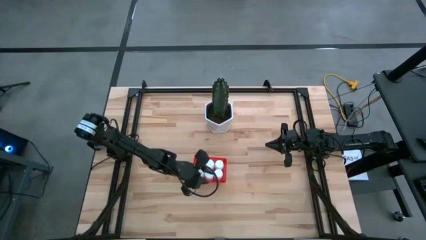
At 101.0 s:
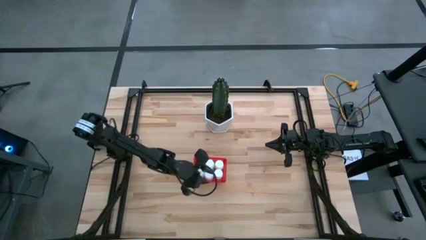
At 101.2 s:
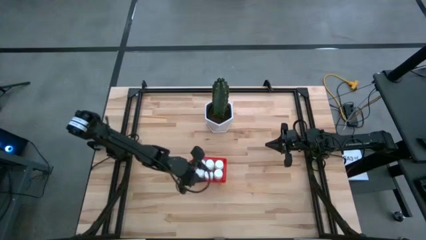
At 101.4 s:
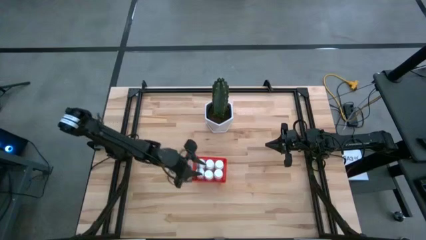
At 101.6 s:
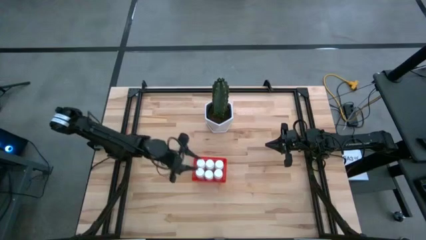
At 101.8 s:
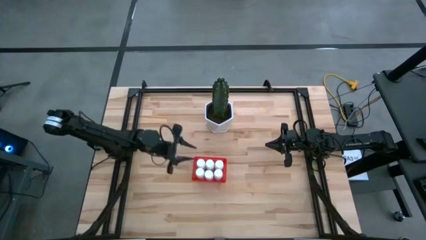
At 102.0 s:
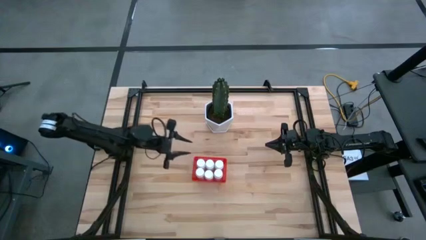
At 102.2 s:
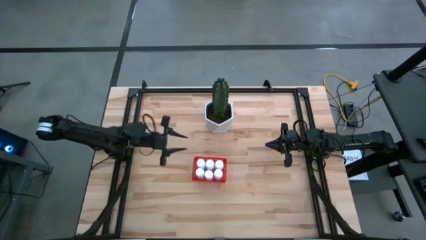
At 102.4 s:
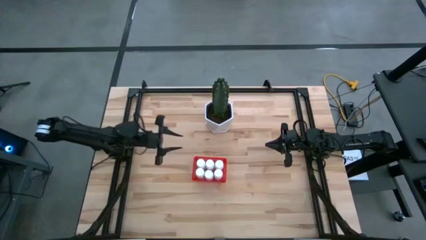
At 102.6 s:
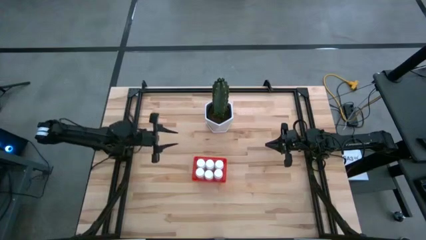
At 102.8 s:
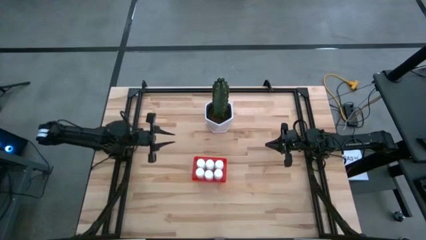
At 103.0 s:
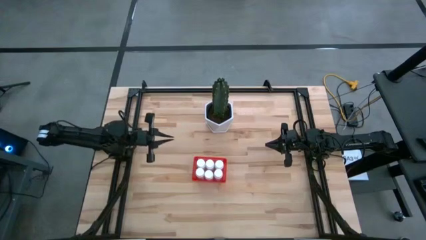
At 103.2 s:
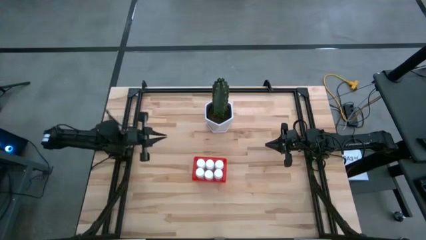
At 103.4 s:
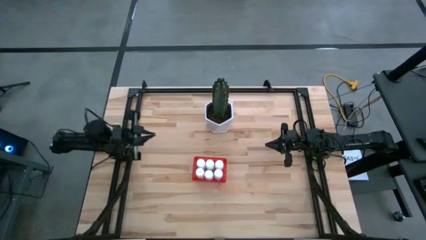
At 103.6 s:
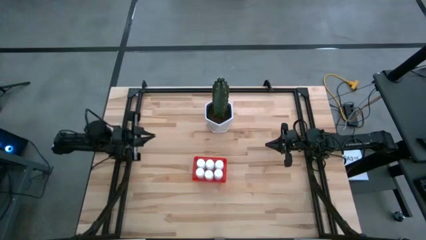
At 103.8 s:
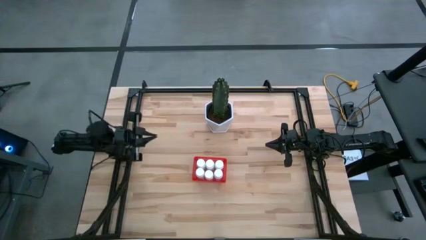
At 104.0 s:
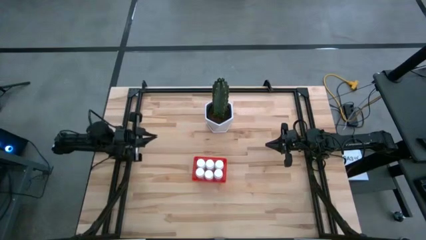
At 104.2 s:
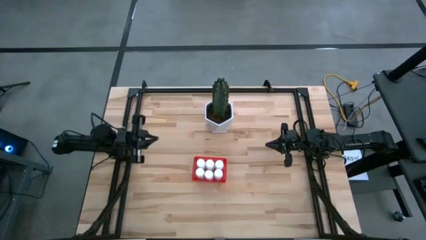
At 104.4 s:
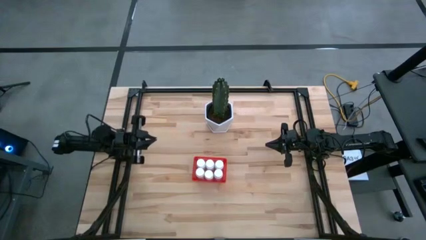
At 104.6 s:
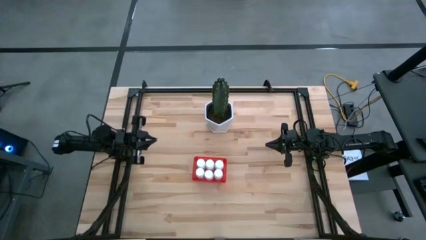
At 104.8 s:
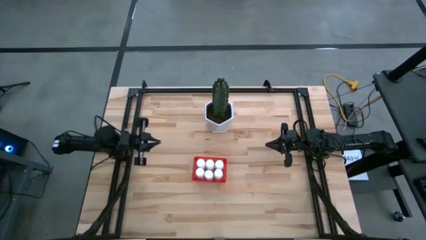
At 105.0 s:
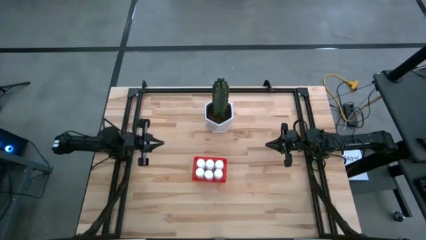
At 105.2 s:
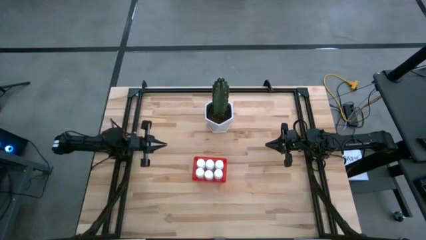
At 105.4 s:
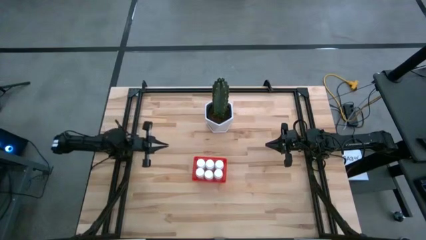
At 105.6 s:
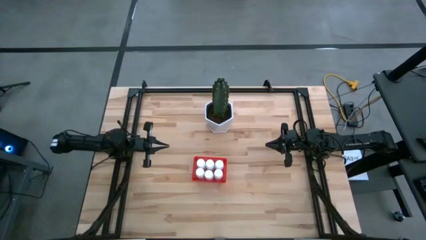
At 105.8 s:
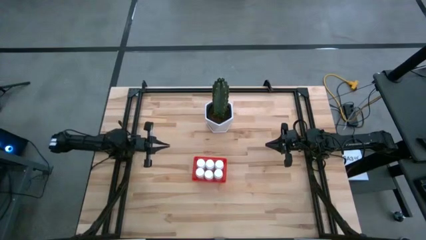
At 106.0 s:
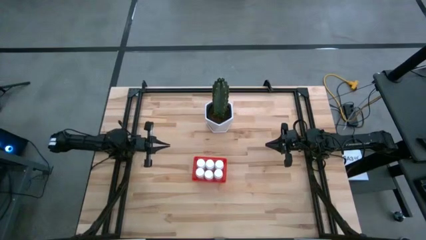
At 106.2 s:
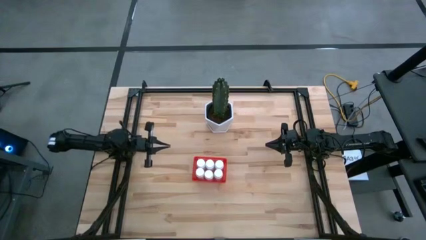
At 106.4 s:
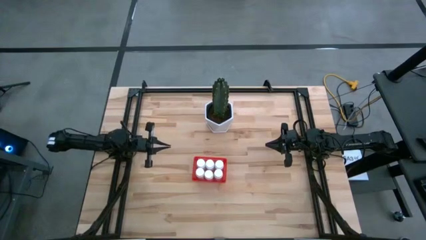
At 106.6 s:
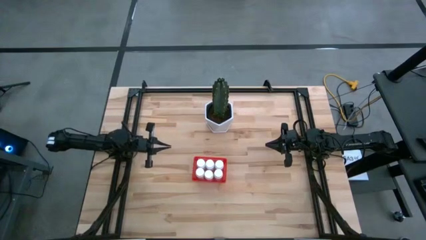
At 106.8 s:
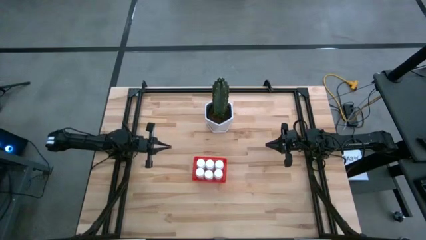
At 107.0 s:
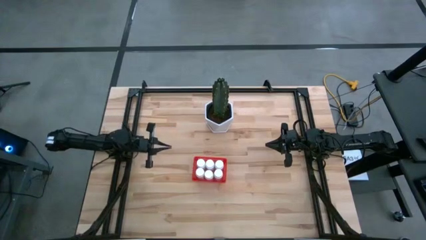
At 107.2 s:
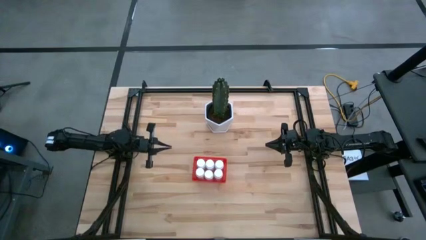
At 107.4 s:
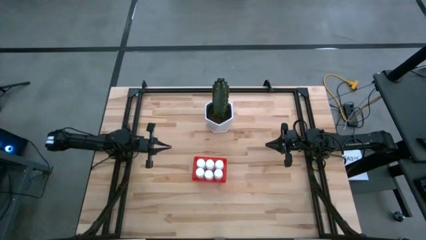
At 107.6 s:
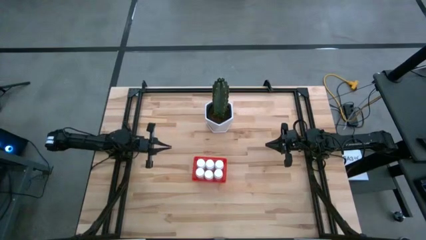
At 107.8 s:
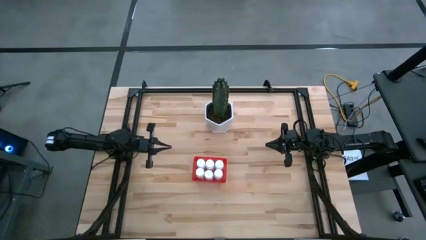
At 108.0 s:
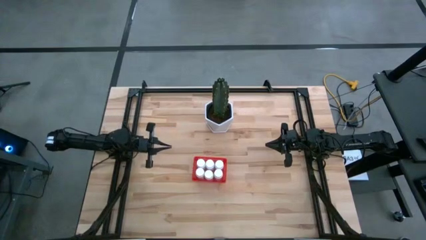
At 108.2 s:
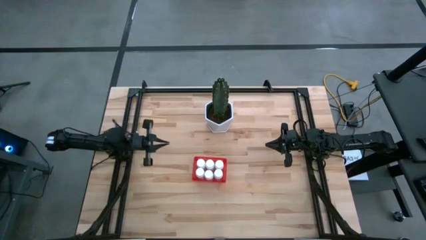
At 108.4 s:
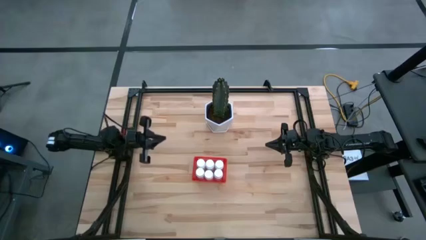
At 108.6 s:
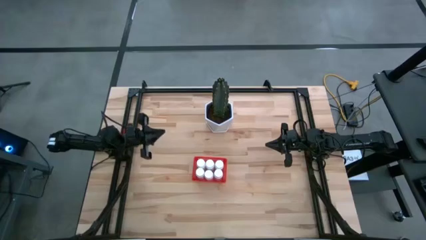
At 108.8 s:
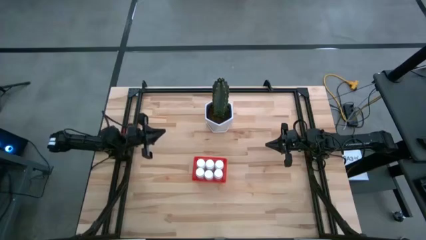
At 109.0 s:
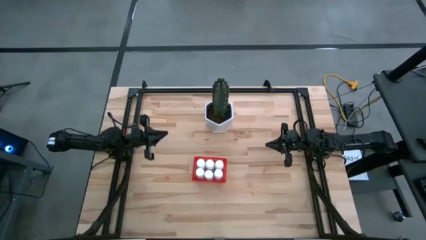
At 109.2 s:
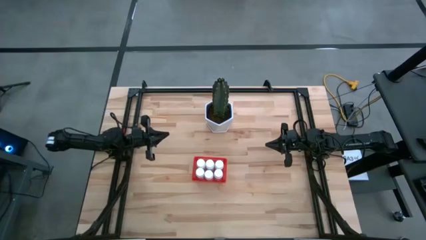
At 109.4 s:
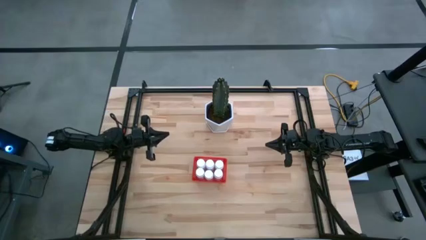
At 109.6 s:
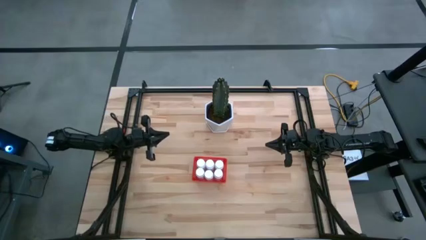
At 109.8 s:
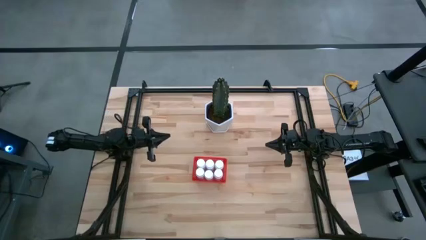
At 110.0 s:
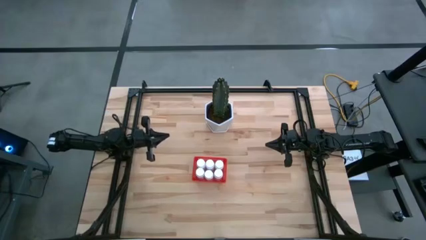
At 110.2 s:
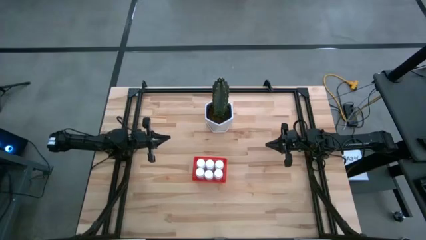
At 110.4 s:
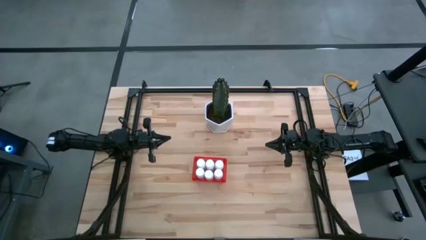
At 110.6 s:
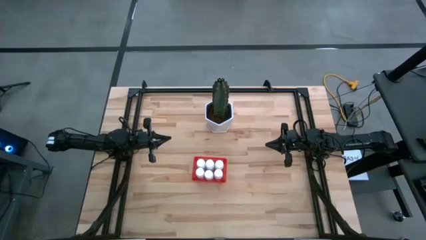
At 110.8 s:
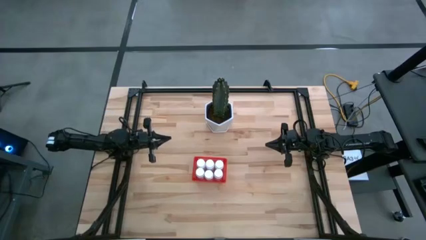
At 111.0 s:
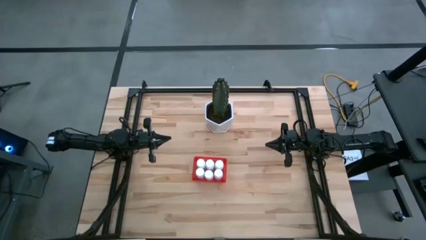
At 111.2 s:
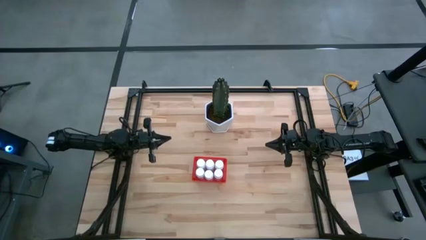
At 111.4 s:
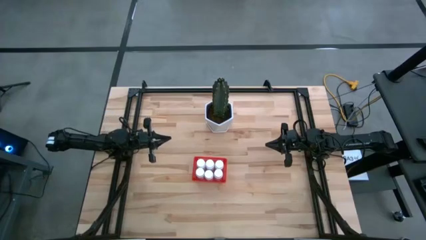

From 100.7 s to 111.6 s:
Task: Pick and place pill bottles into a basket
Return to Home Position

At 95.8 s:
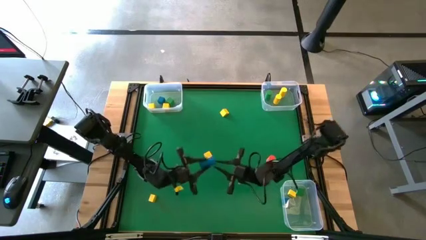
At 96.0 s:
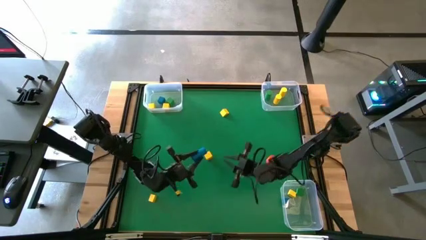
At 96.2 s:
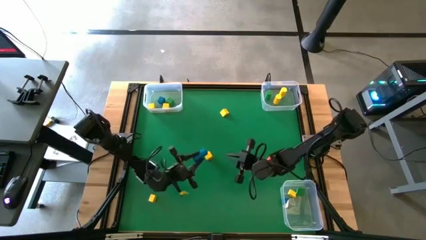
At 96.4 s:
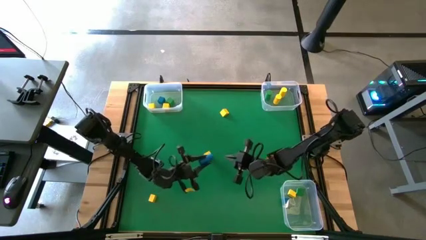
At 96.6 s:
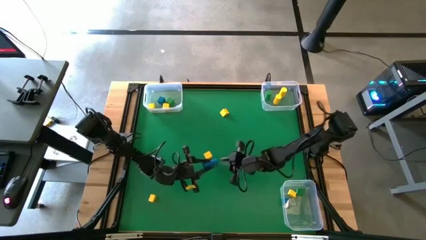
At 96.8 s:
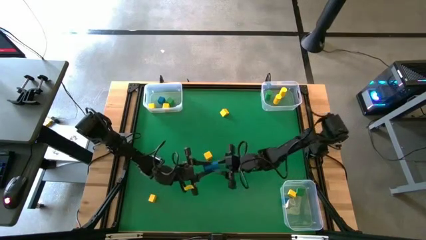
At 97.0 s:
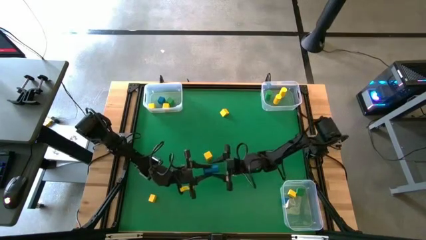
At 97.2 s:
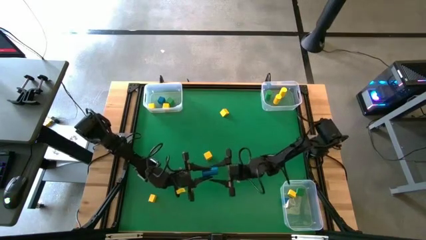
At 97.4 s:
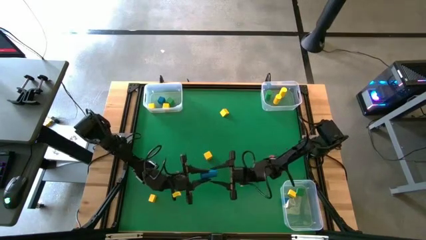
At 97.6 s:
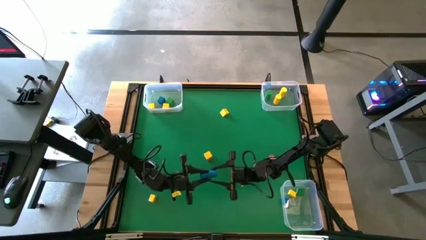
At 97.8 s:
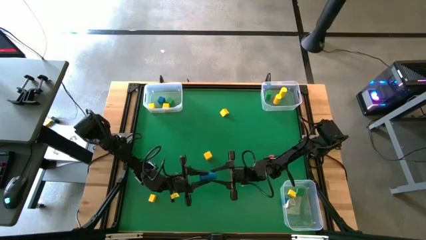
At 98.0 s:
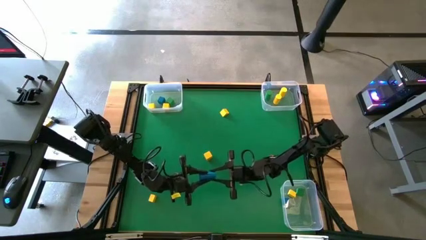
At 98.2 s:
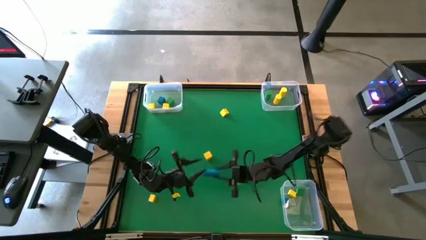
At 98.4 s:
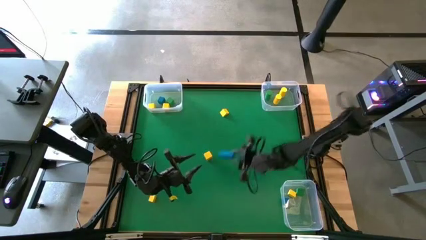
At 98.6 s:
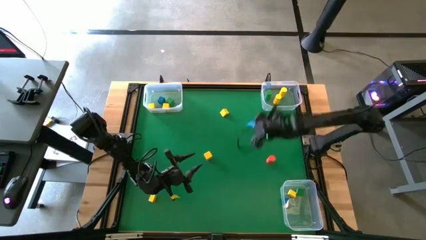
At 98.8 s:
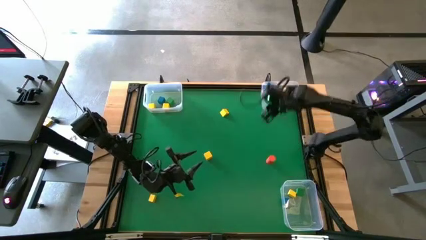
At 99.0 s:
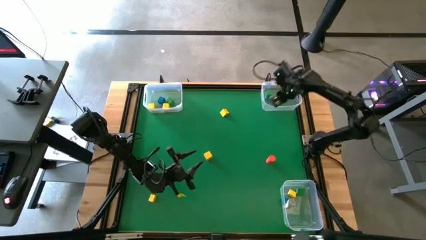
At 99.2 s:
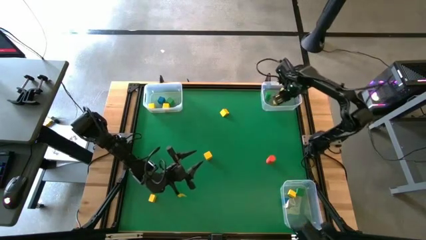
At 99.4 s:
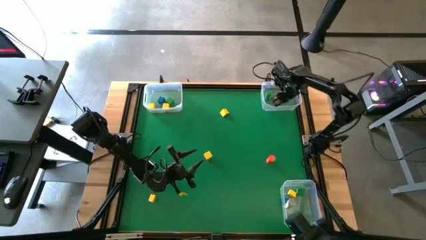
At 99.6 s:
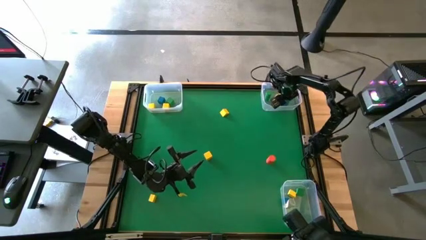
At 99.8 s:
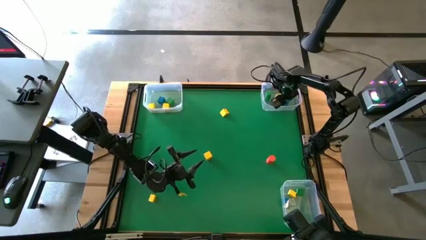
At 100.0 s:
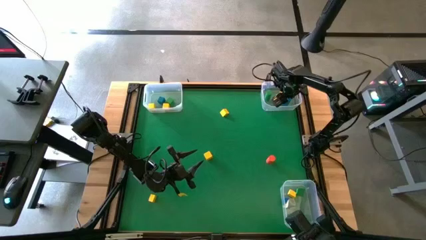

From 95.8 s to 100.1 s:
Task: Sort blocks by size
Put the blue cylindrical block into the top right transparent bin
